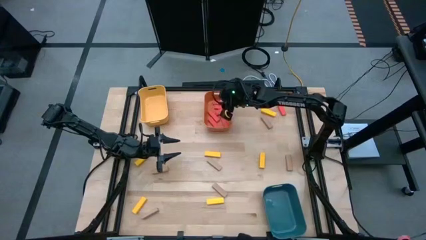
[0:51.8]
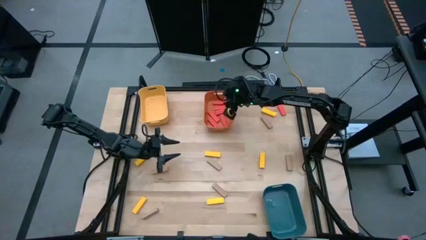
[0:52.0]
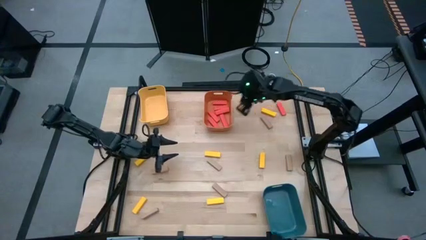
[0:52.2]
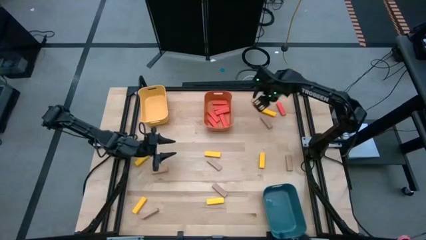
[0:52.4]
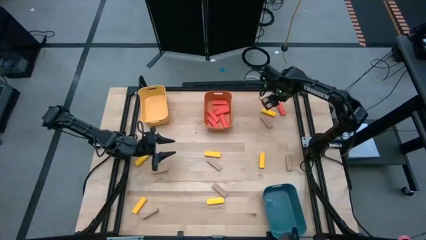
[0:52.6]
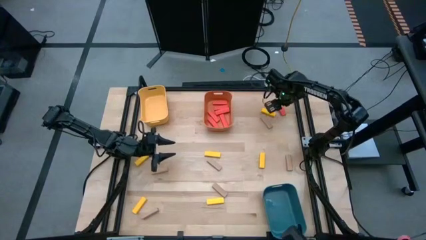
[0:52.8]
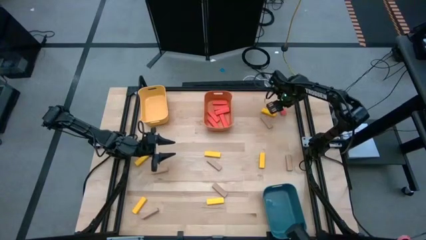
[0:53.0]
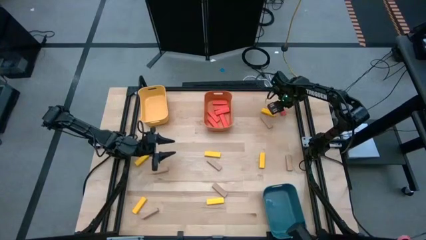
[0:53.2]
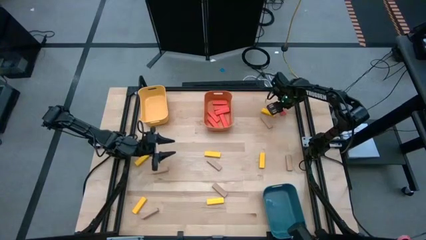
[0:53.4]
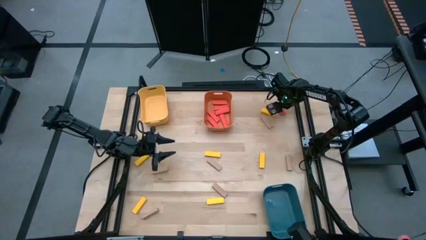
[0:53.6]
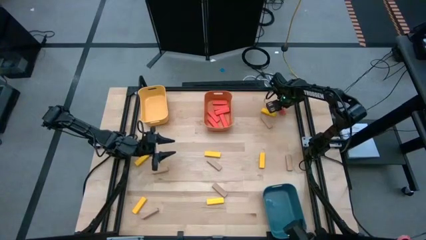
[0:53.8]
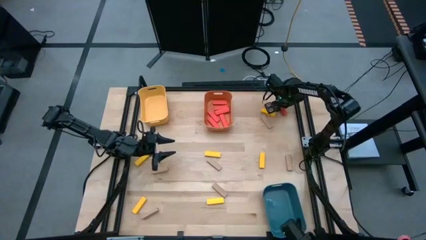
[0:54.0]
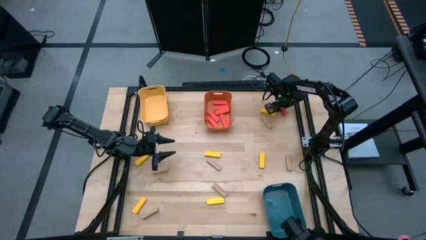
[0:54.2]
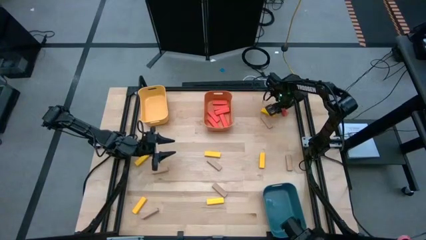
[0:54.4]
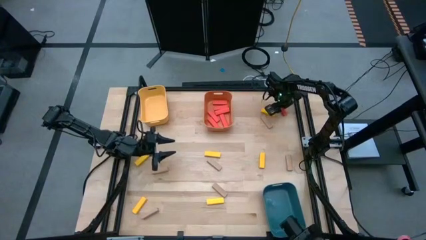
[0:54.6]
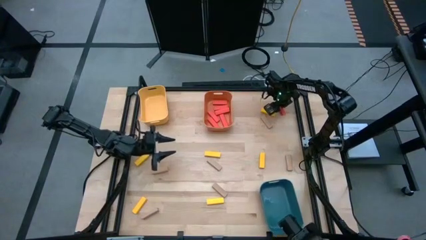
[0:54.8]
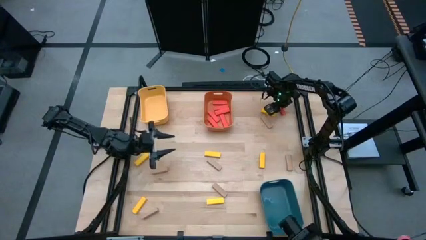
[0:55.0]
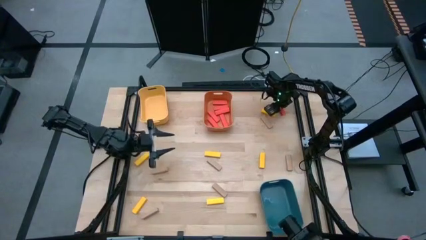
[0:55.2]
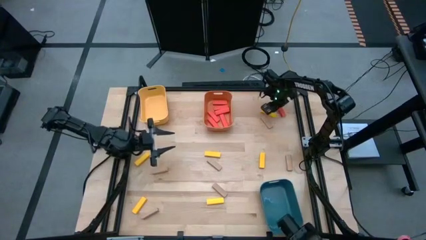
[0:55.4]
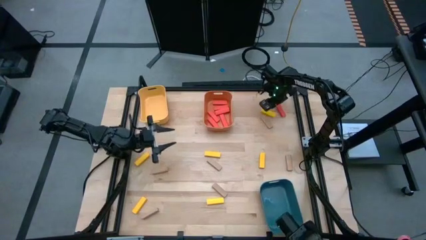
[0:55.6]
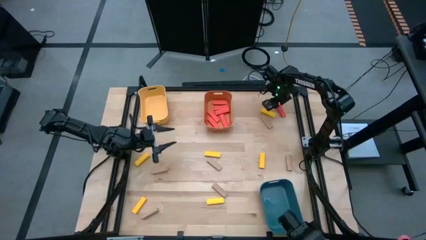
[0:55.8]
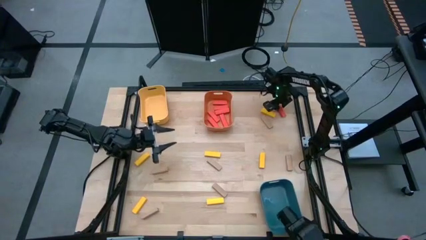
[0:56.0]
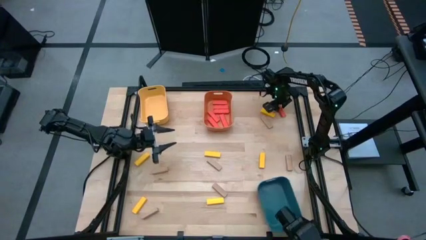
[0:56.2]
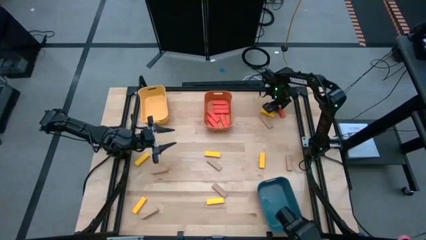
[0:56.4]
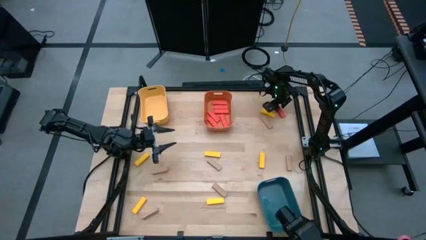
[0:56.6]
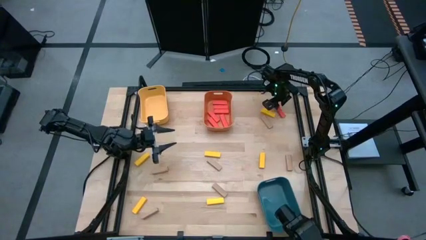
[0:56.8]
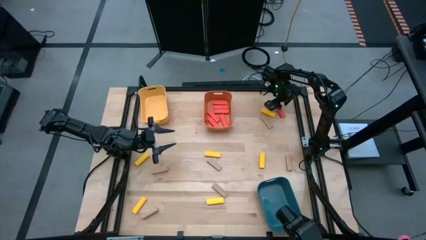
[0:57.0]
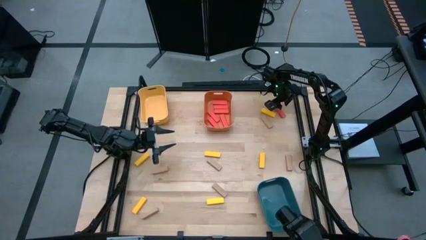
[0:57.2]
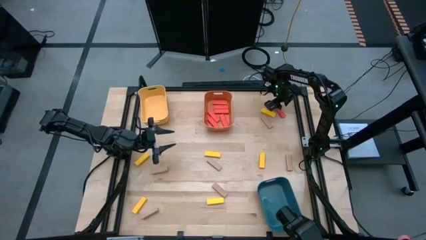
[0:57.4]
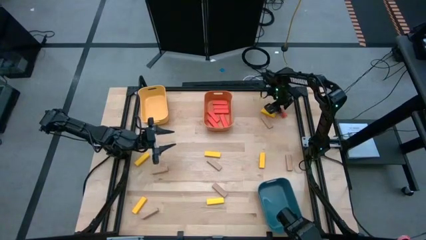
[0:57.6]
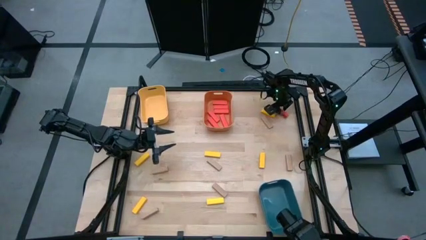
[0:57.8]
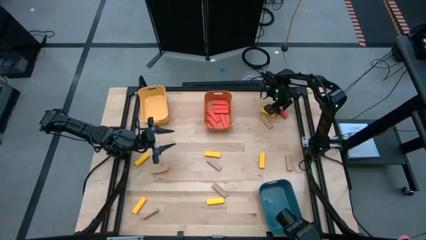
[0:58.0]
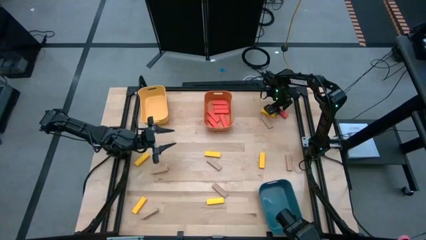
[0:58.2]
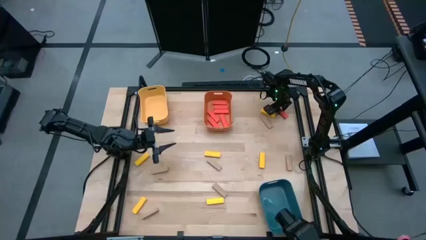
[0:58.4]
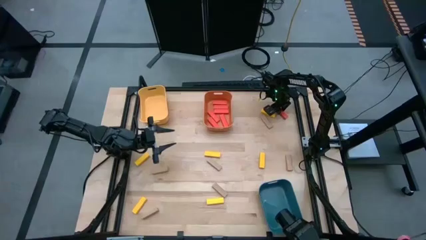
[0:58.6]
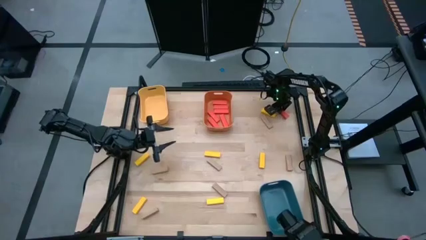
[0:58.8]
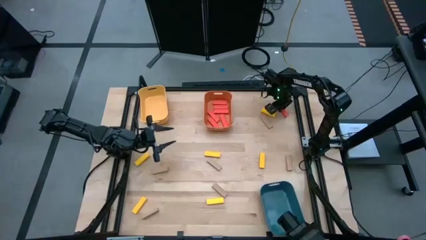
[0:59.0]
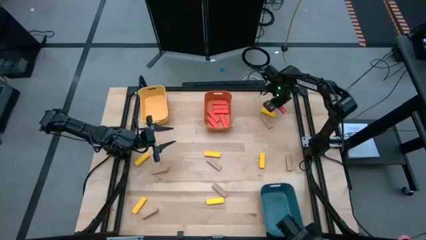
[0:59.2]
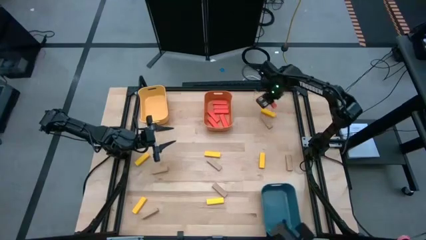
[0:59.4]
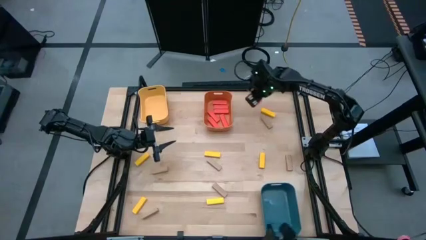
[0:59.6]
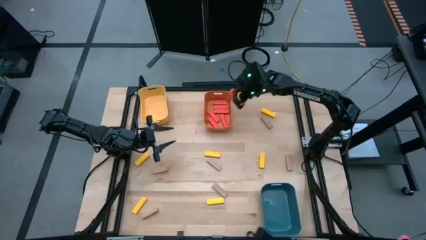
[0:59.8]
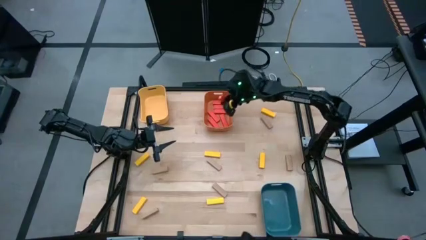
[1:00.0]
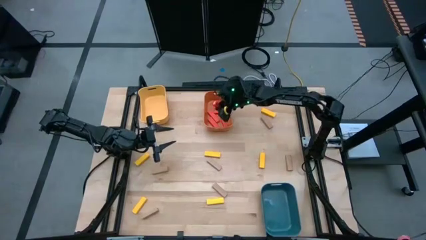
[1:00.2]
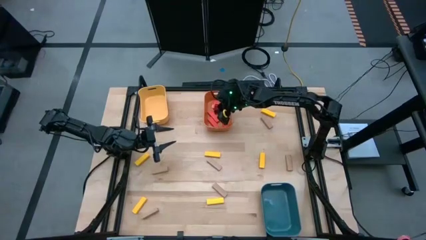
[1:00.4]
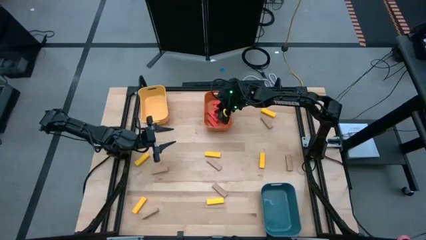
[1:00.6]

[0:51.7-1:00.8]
Task: Sort blocks
Put the orange block into the orange bin

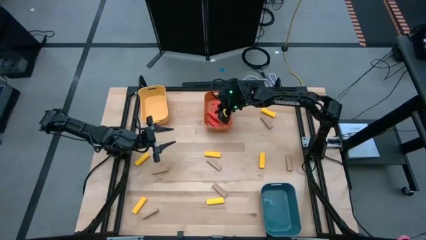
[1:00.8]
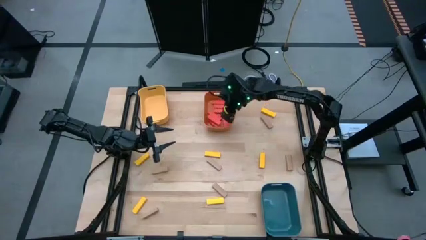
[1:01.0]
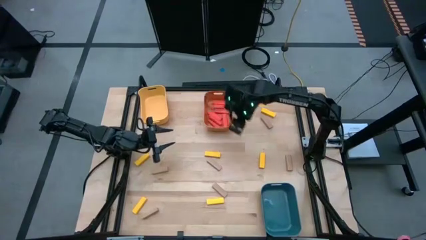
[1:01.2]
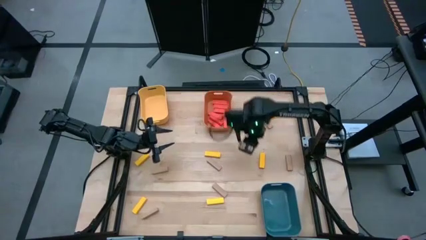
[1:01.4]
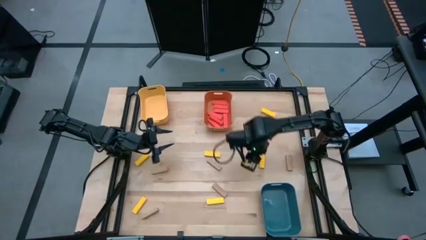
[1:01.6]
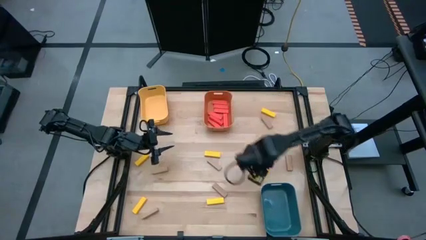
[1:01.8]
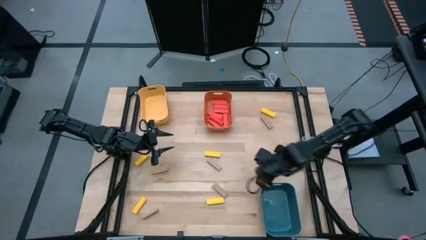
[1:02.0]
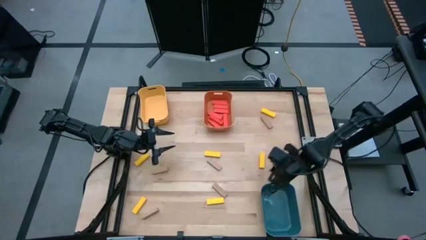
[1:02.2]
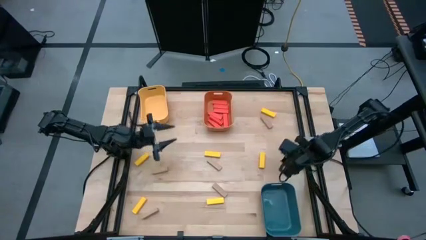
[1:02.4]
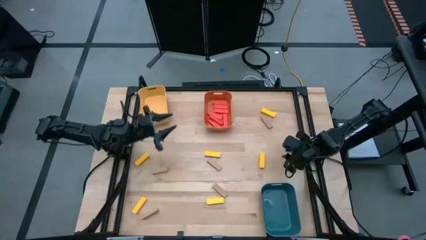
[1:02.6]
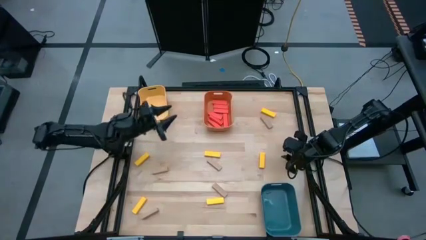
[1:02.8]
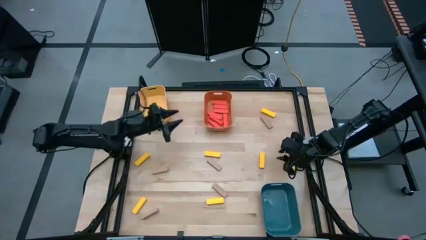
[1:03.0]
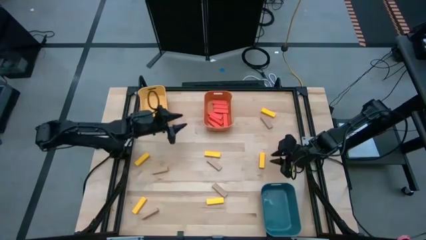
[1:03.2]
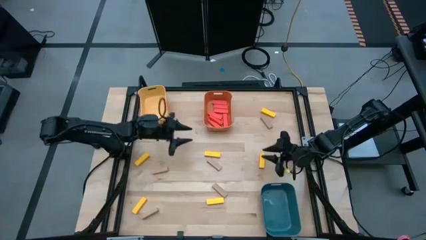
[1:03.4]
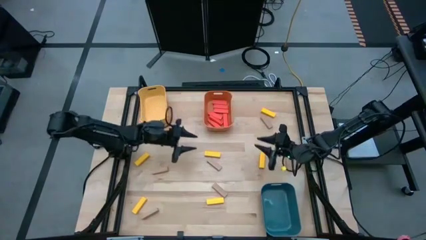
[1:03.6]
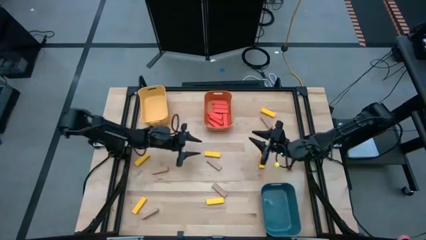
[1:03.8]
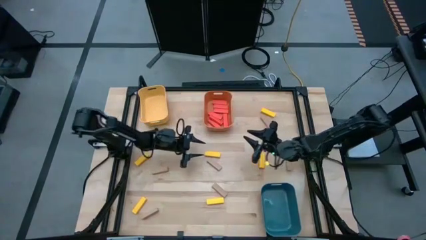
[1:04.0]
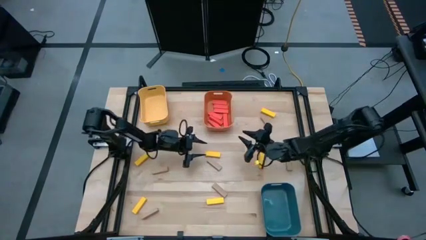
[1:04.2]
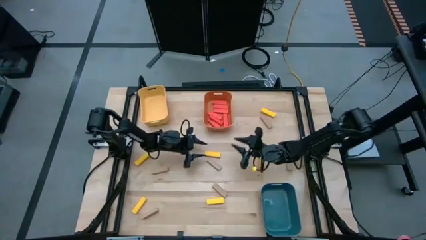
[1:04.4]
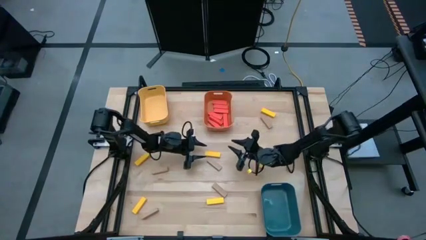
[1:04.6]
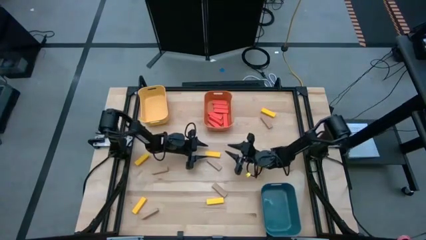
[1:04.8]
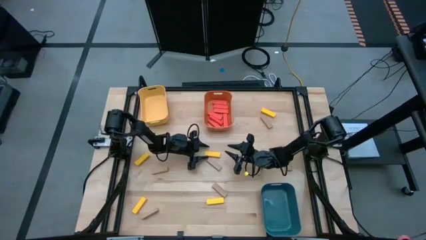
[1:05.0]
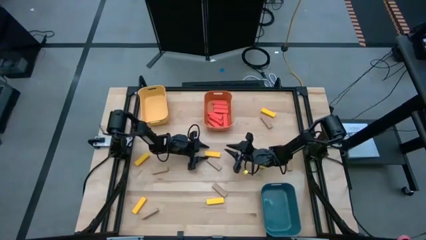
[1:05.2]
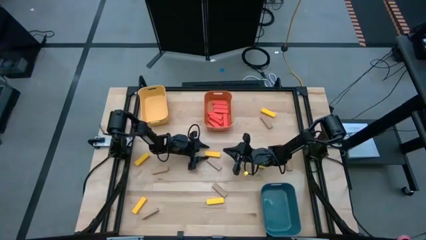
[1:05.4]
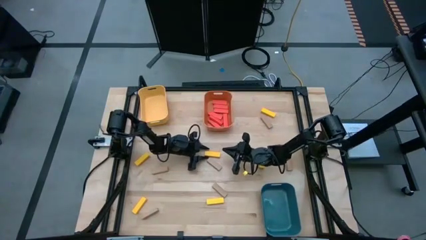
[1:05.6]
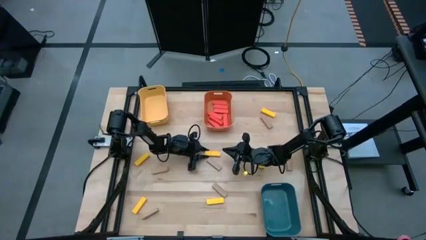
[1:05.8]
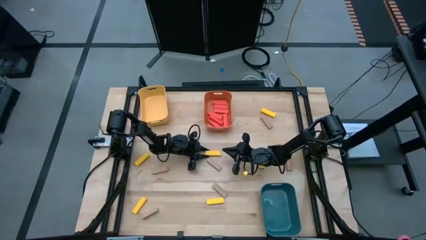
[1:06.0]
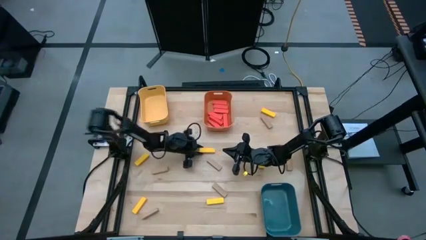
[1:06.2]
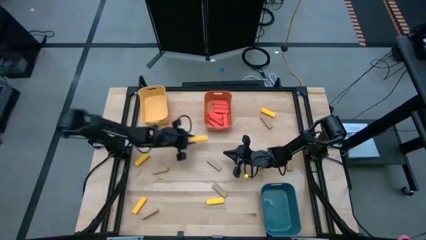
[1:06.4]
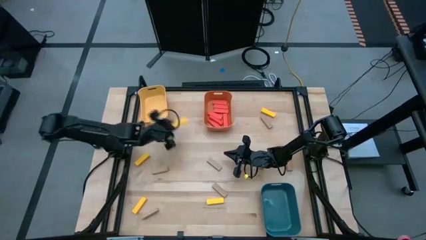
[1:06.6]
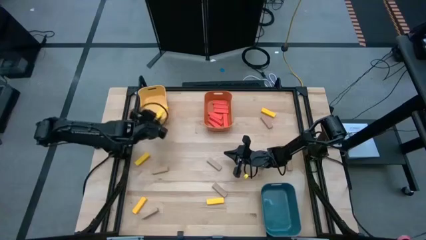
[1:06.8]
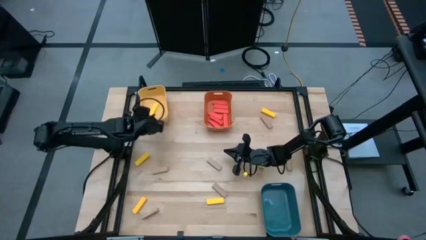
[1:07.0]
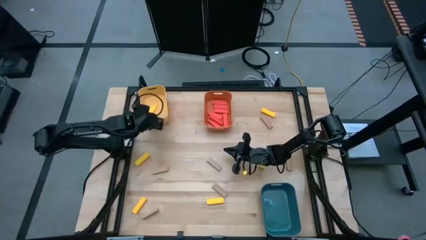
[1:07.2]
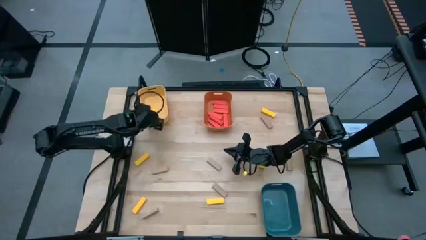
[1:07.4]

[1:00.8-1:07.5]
Put the yellow block into the yellow bin
